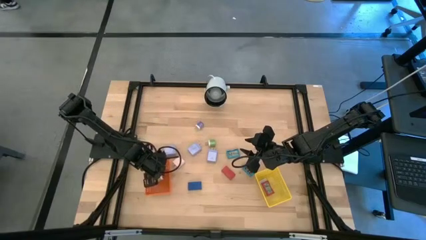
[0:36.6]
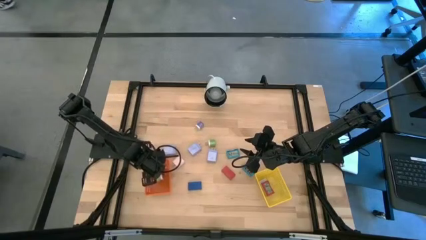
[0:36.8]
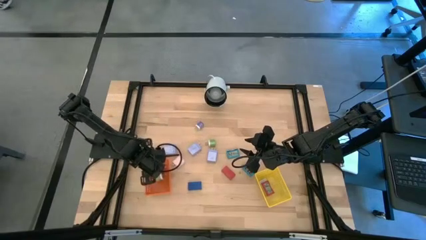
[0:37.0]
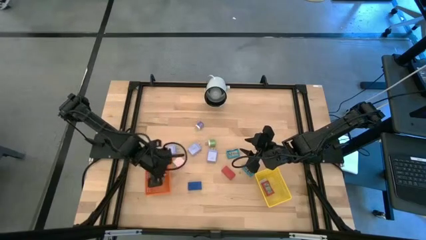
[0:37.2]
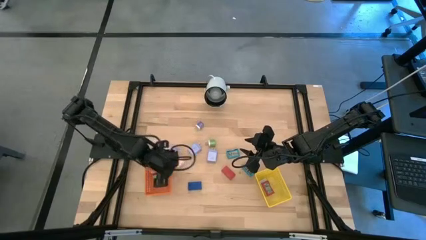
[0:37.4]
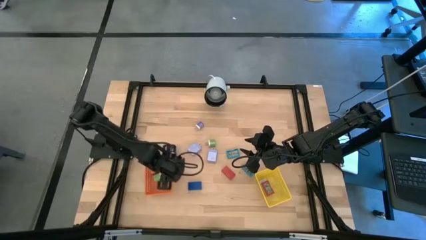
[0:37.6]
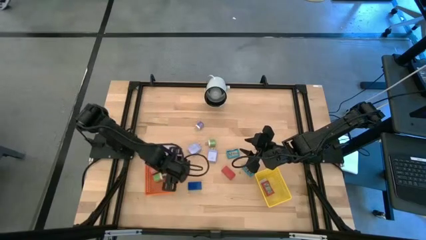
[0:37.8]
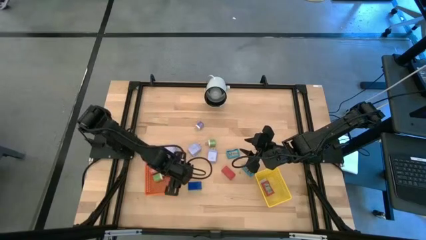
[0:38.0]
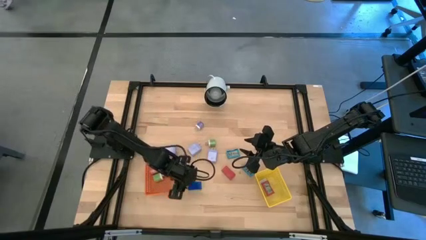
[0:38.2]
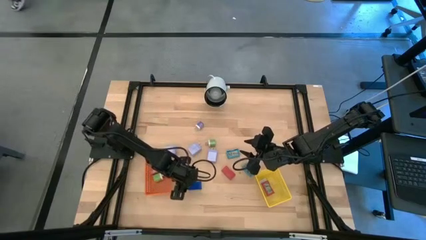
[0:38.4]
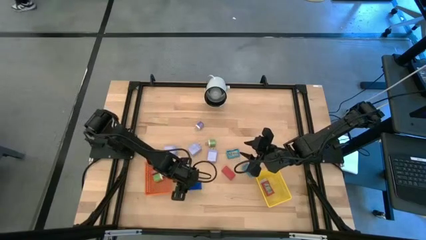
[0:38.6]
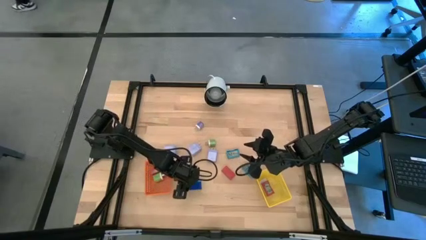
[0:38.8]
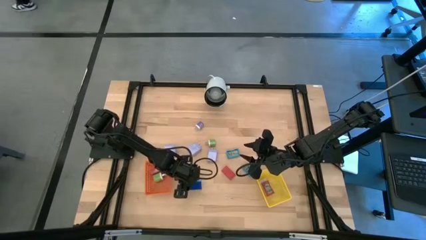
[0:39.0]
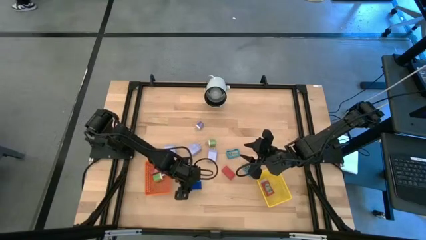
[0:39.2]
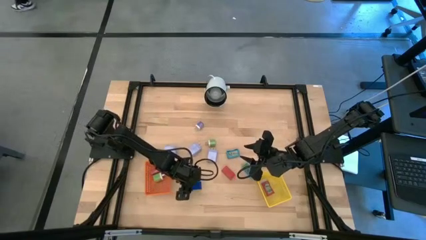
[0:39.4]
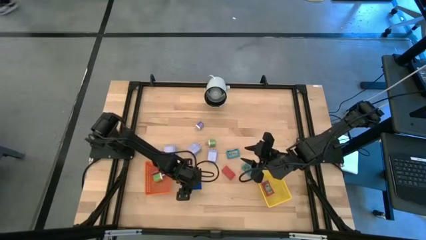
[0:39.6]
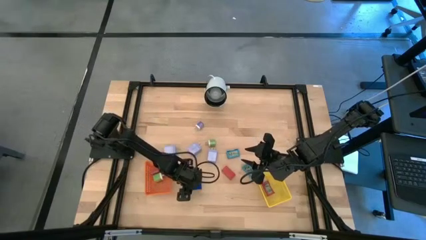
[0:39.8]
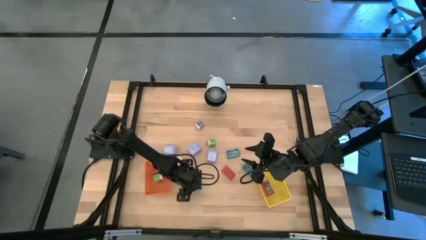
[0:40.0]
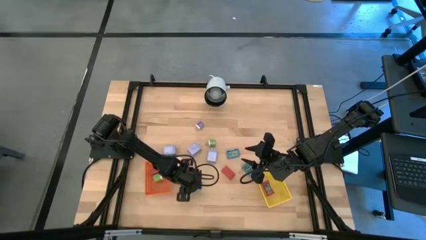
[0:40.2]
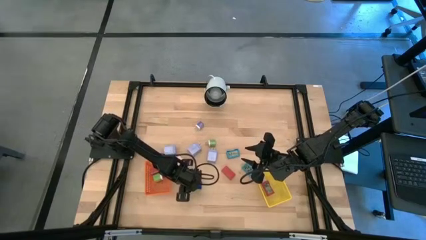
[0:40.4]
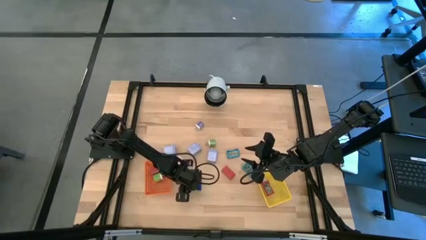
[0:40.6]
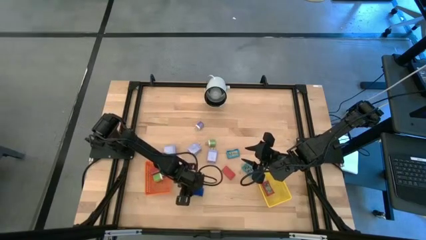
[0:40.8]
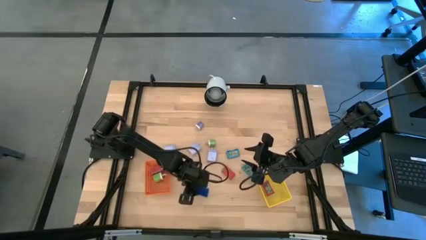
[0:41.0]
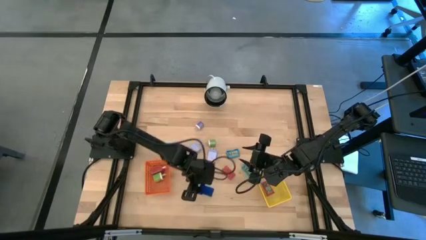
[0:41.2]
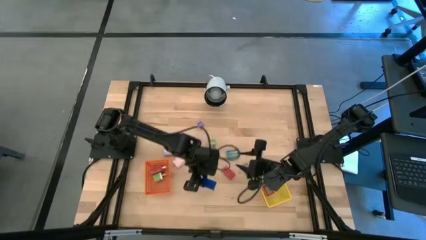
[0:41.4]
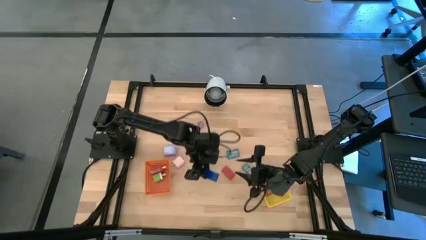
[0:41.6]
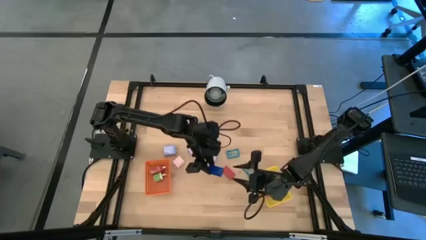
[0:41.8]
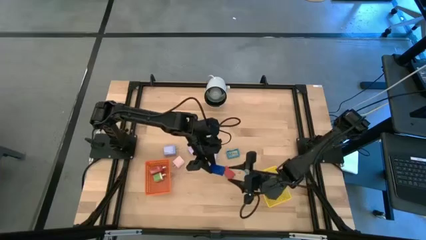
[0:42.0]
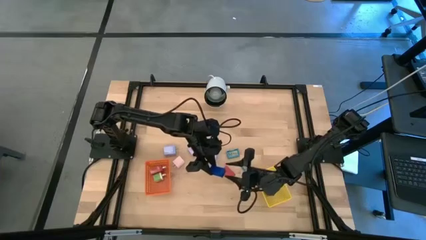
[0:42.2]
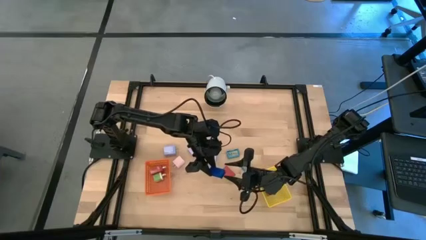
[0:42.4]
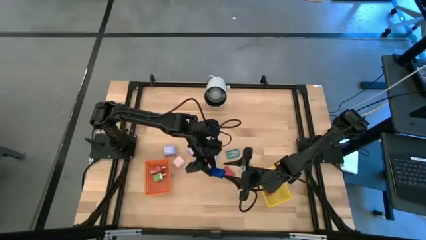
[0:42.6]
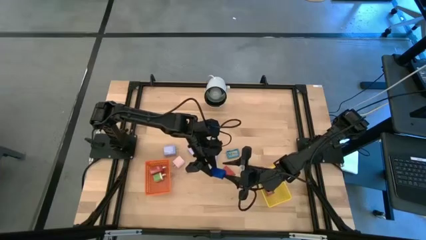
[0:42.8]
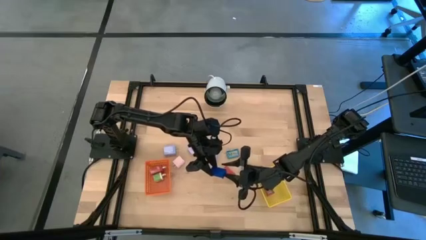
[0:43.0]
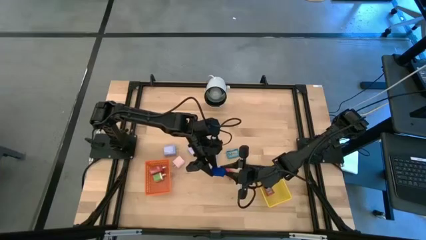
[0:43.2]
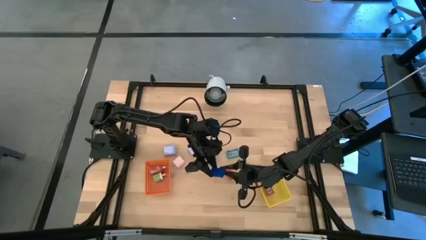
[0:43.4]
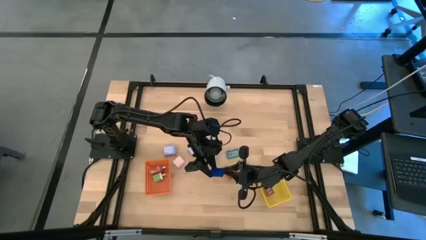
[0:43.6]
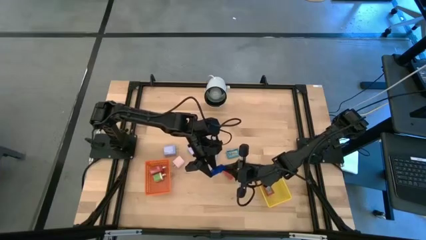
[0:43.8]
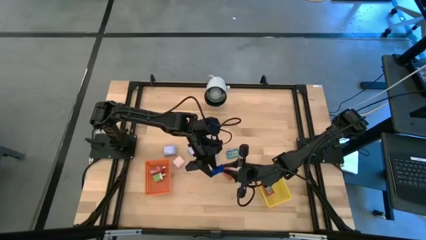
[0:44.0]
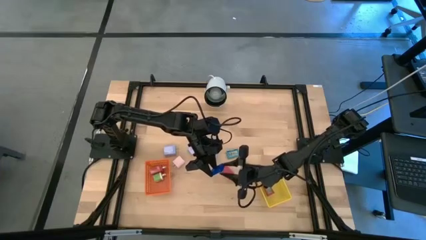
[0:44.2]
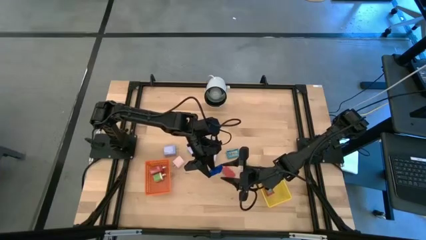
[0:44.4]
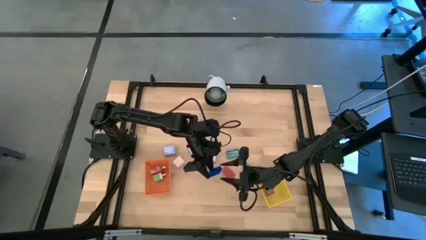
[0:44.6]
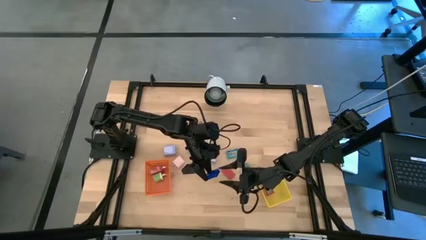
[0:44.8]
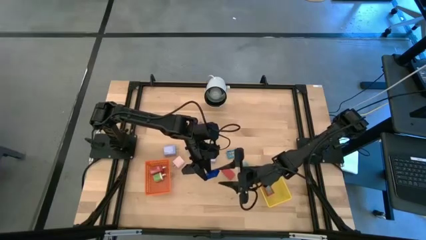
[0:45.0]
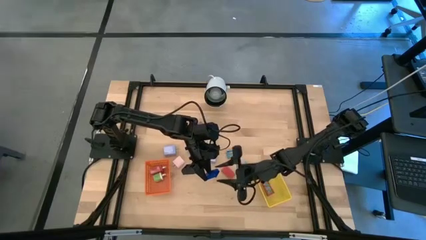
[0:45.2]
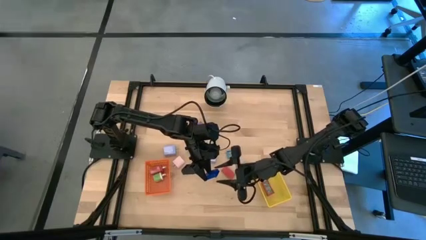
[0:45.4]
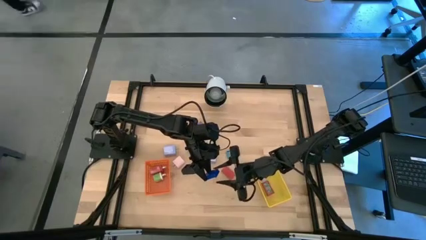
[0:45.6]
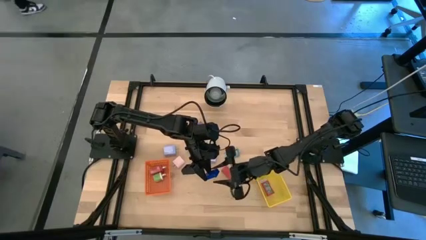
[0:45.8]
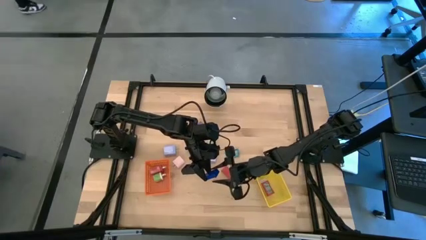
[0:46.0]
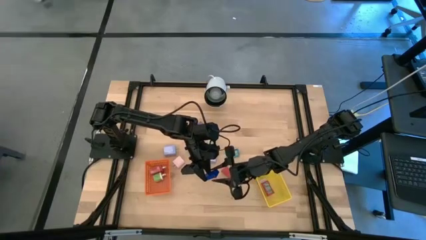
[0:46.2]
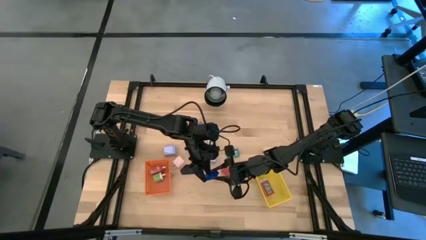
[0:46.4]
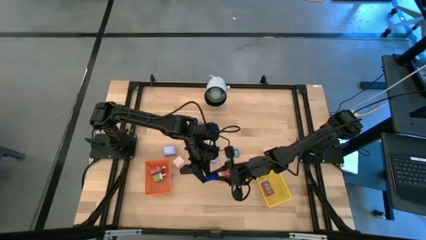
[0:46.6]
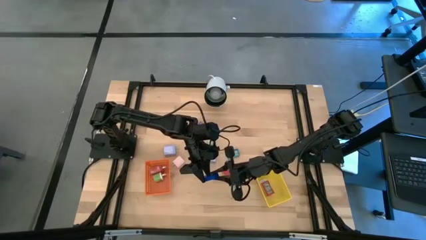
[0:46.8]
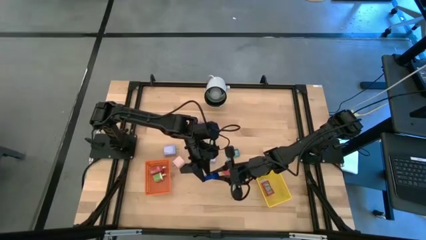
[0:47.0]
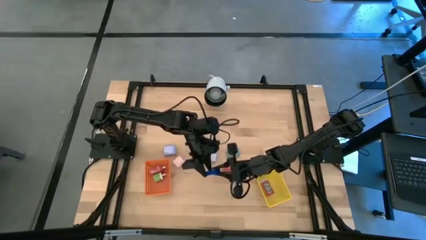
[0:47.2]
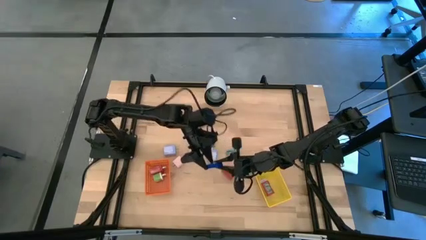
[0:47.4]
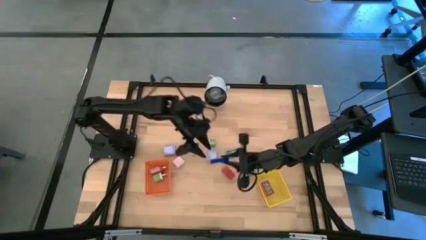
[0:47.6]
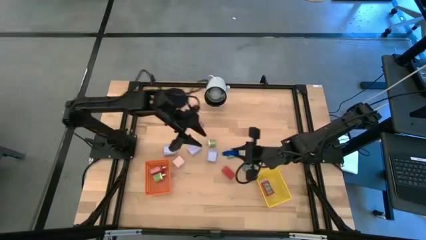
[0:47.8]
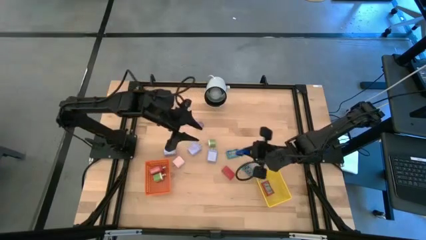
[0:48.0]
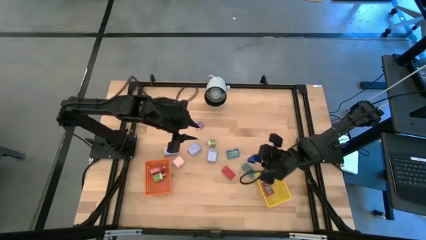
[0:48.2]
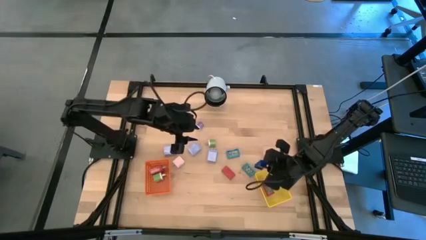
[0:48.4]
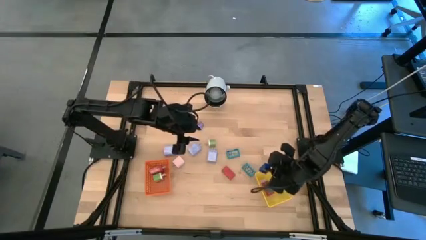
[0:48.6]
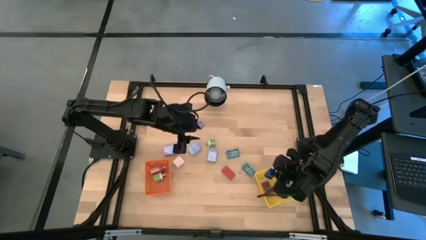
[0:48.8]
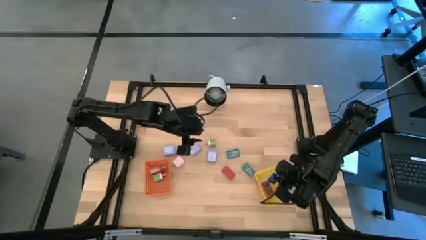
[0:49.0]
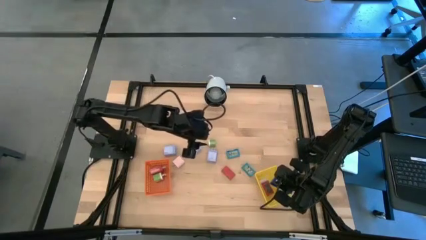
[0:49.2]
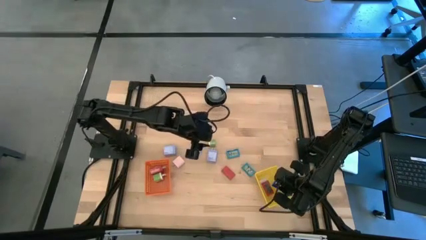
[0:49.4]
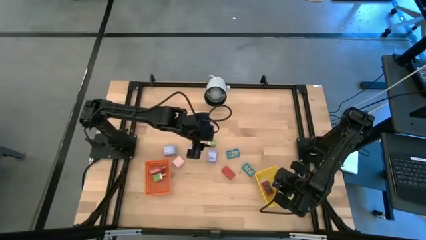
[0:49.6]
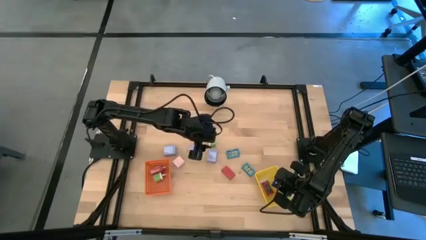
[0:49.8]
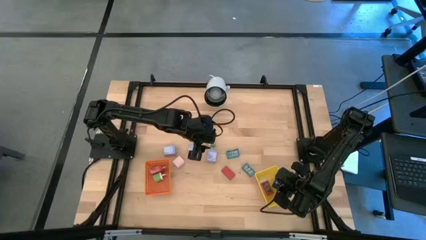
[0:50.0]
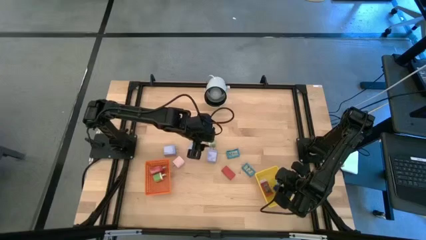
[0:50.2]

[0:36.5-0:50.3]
Task: Pick & Place Office items
Put the blue digital clock into the yellow basket

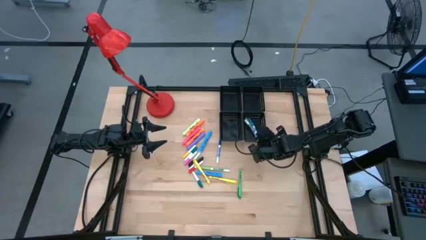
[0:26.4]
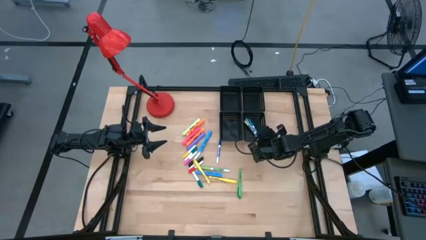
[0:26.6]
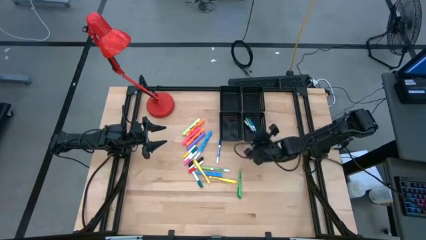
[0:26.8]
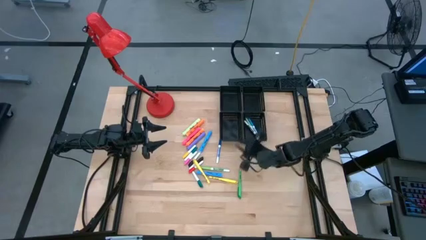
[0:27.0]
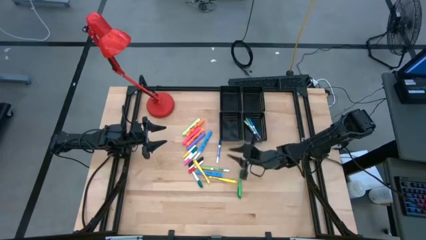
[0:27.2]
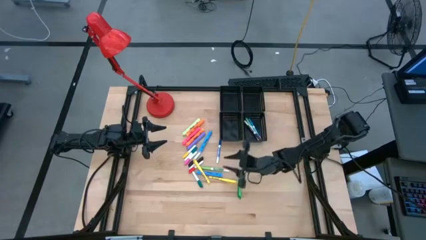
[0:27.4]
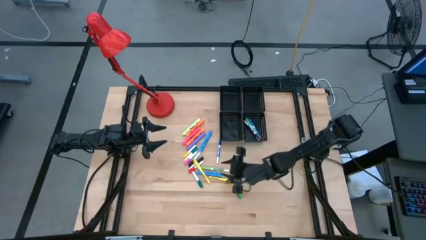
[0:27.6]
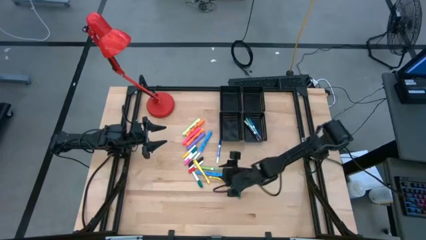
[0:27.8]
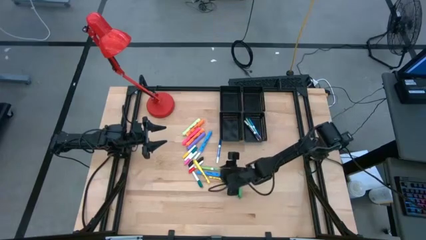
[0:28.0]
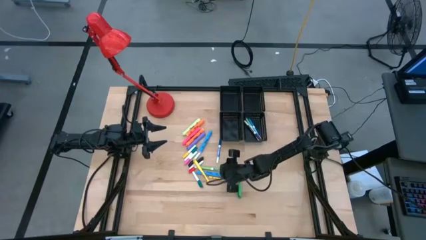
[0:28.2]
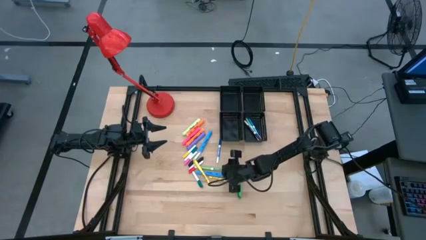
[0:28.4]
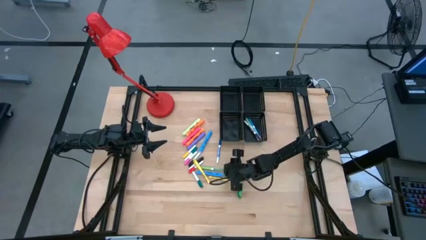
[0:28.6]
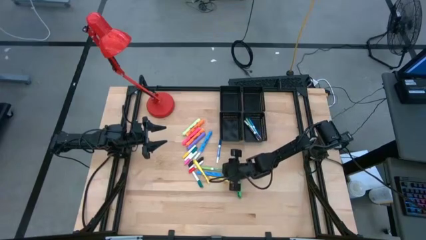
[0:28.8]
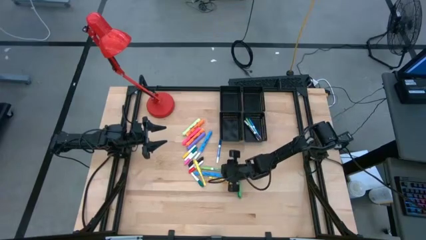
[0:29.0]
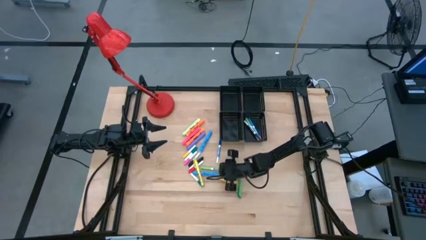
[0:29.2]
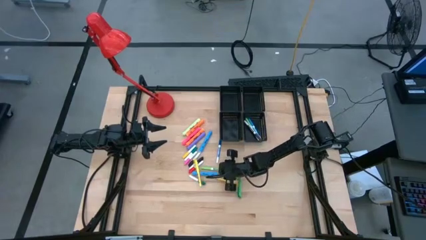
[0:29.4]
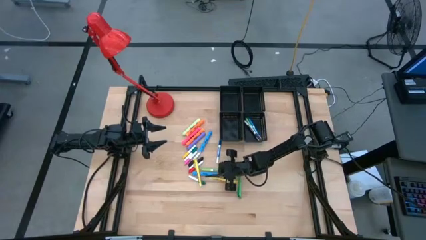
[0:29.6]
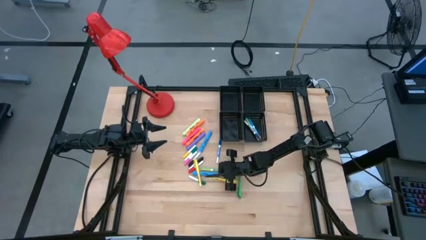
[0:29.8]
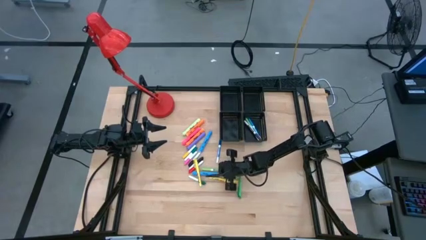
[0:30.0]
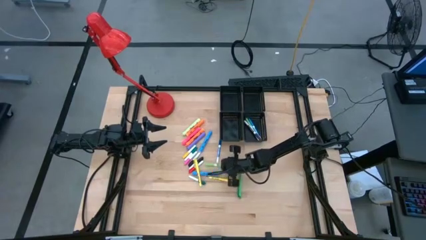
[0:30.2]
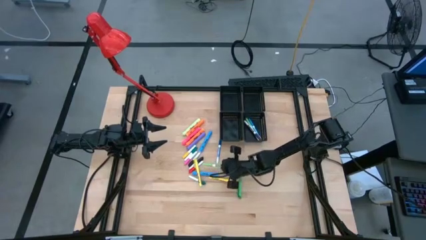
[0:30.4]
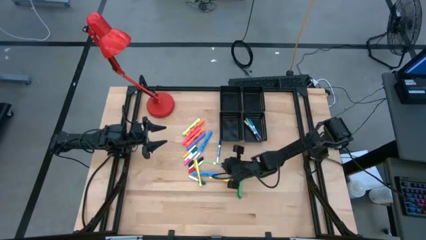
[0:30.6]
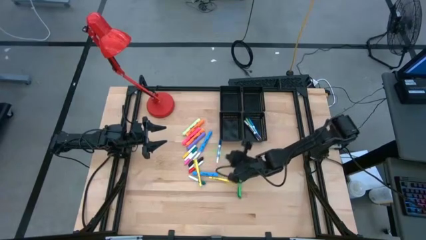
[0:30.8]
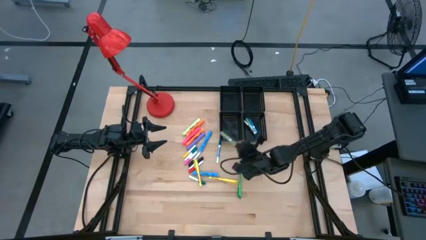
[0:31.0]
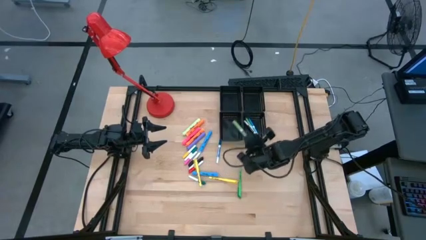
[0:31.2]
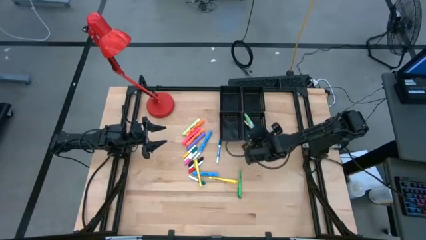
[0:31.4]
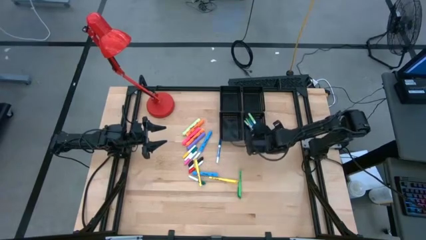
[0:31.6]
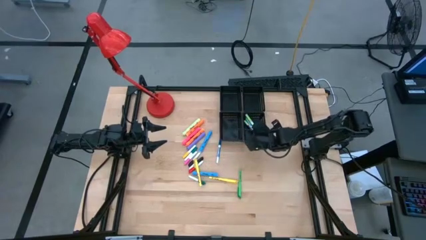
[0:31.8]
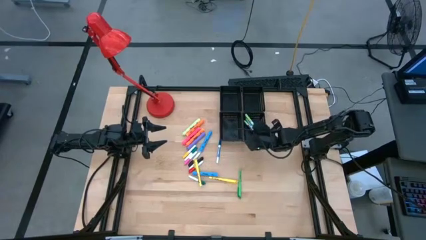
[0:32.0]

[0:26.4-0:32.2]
Task: Pick & Place Markers
Put the green marker pen into the bottom right black bin
